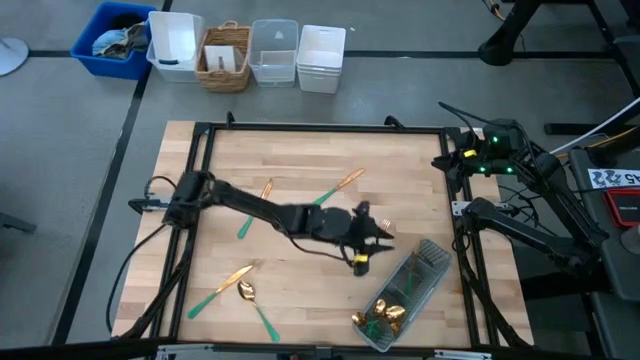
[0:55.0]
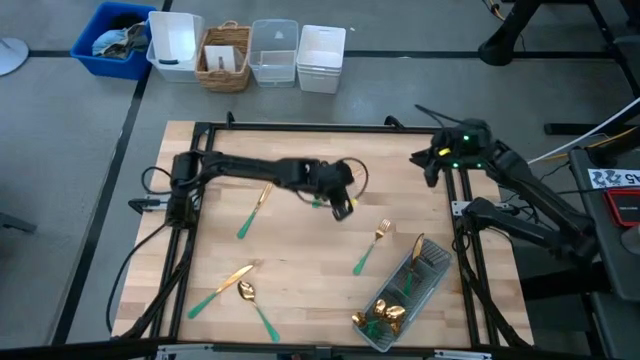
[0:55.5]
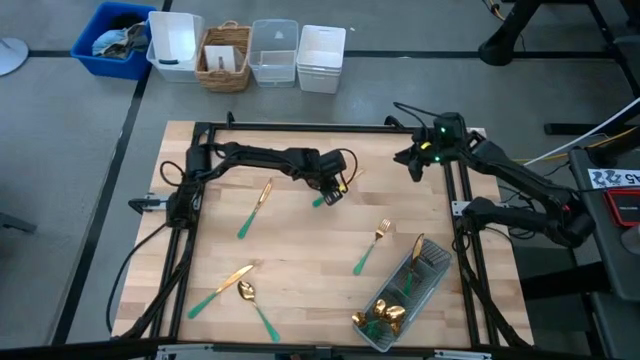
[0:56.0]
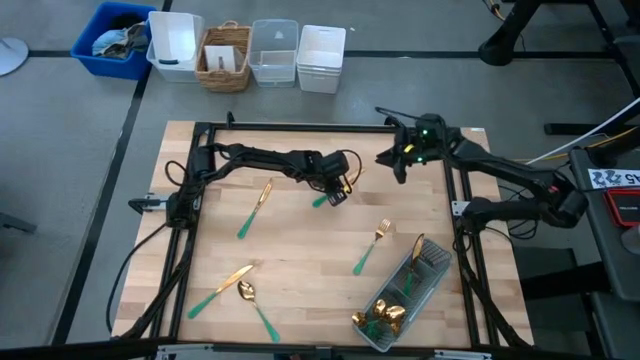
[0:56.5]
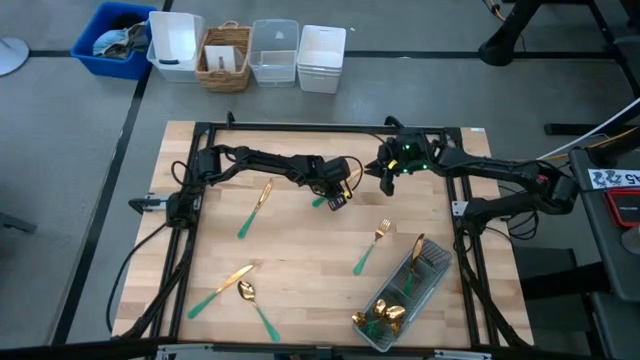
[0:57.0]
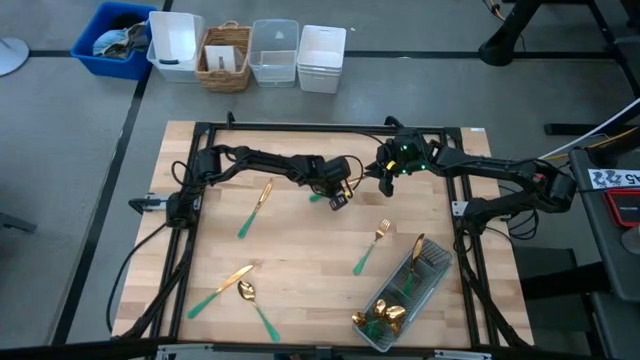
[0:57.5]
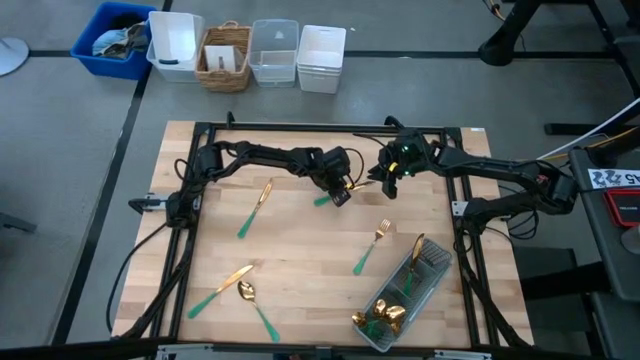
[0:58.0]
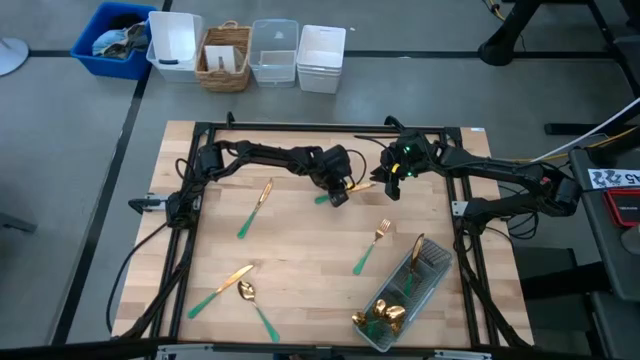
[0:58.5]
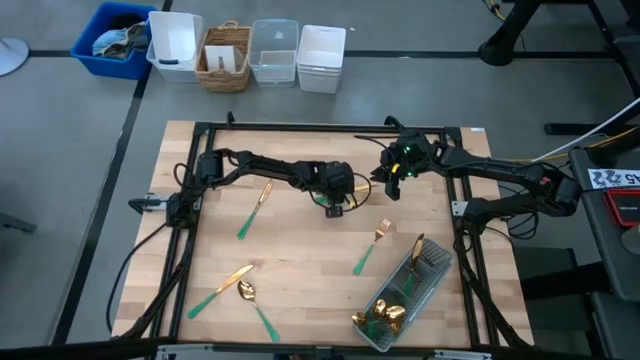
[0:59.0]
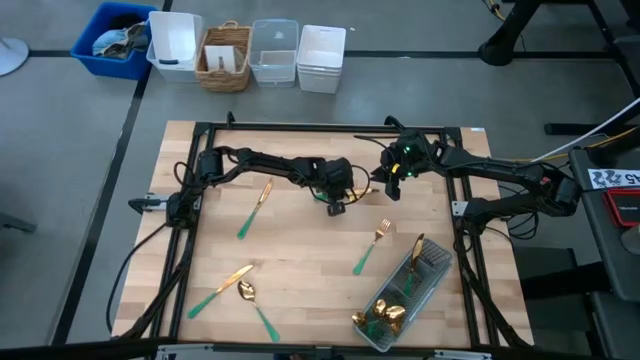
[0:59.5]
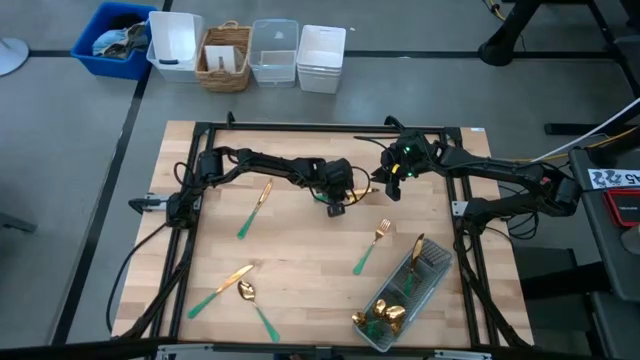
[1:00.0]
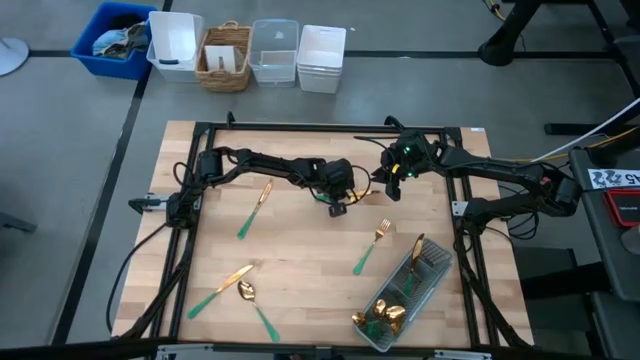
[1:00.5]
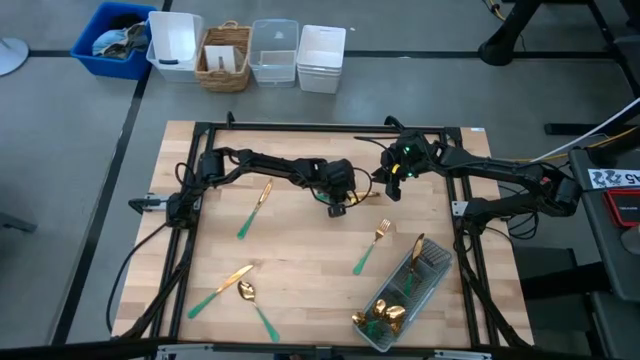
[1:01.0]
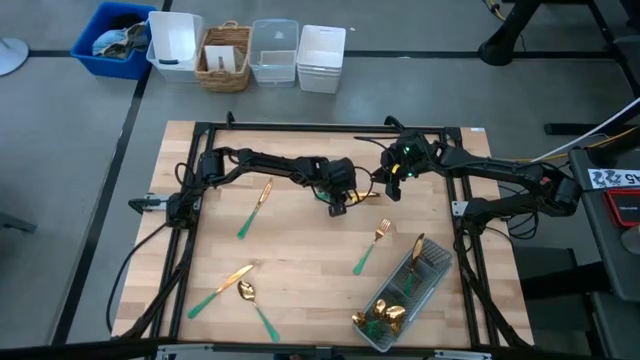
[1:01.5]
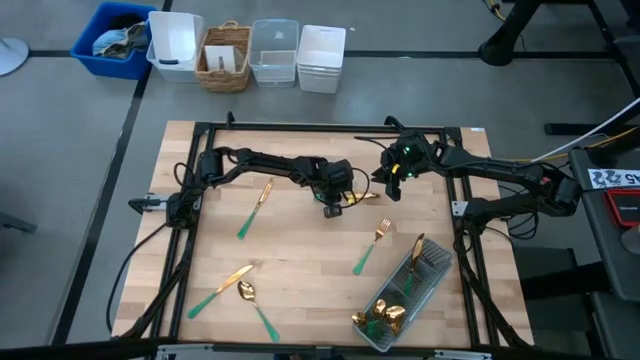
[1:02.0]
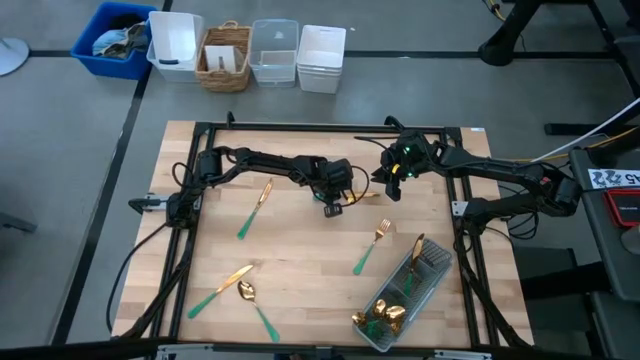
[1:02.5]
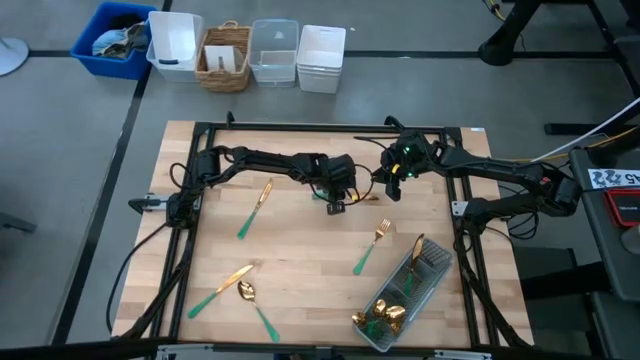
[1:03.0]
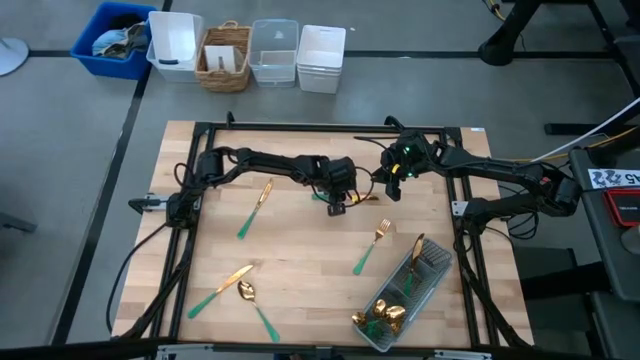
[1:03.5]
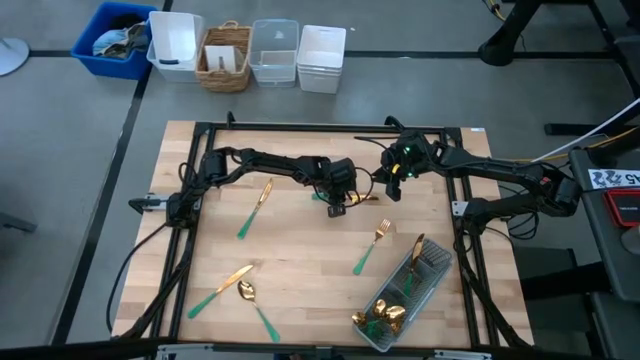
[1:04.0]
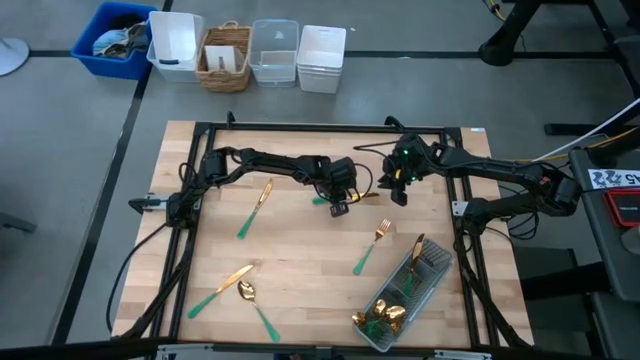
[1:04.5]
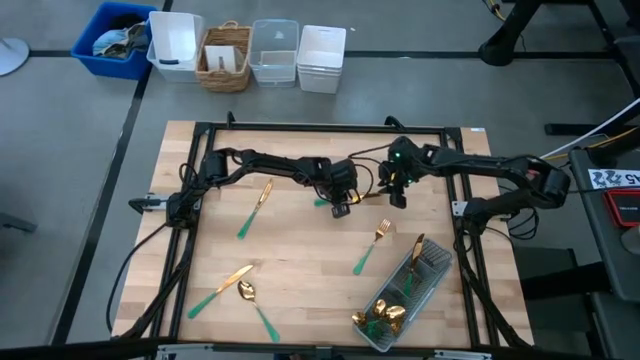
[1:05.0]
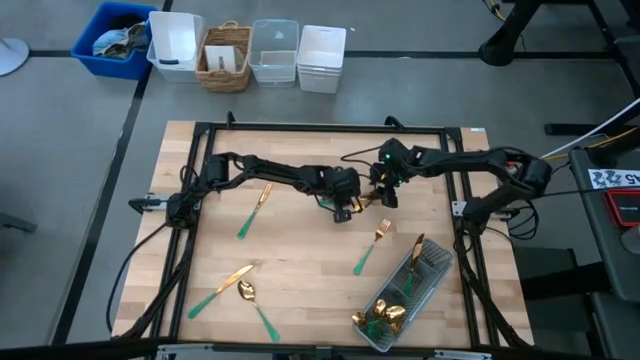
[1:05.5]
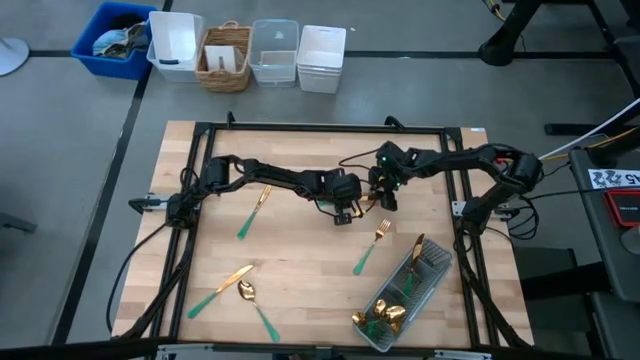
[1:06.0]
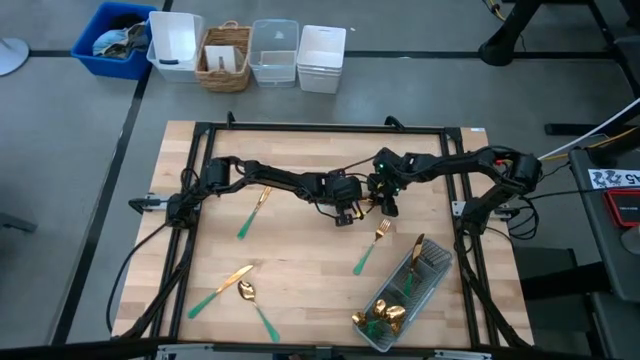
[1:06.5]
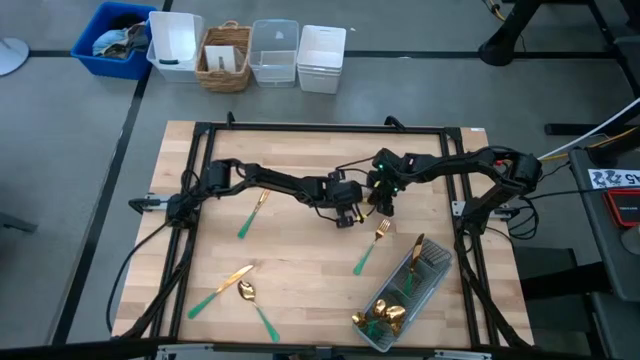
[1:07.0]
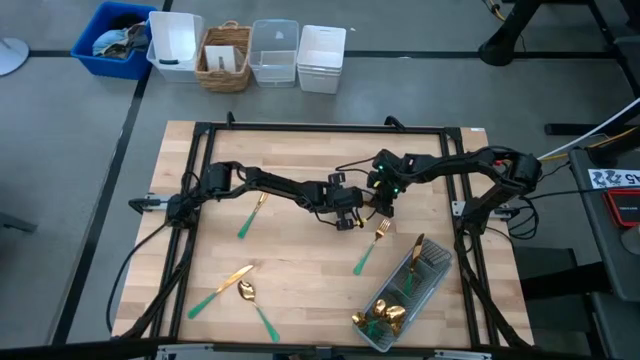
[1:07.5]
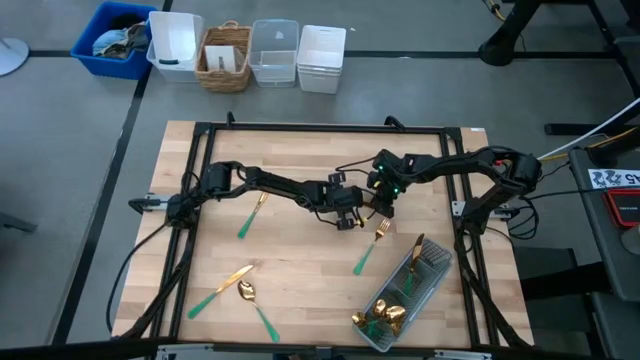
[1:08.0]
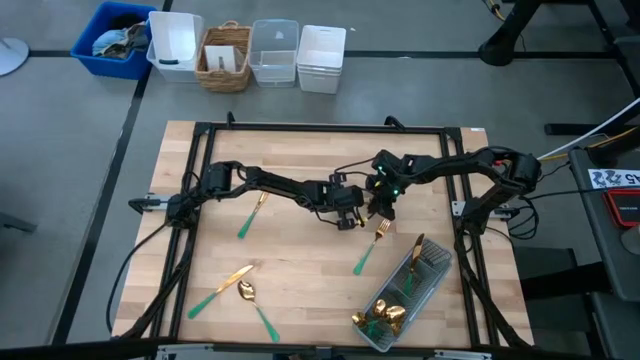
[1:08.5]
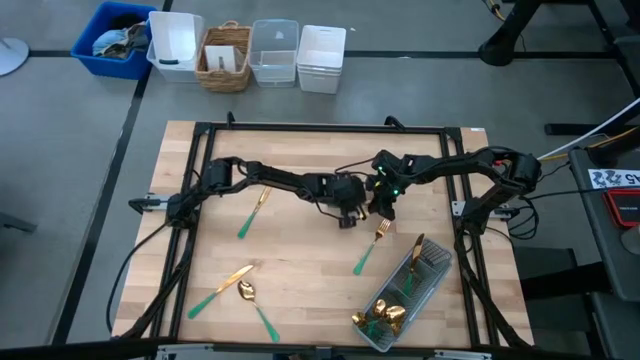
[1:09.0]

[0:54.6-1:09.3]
Task: Sort silverware
Put the top right table knife into the utensil organizer

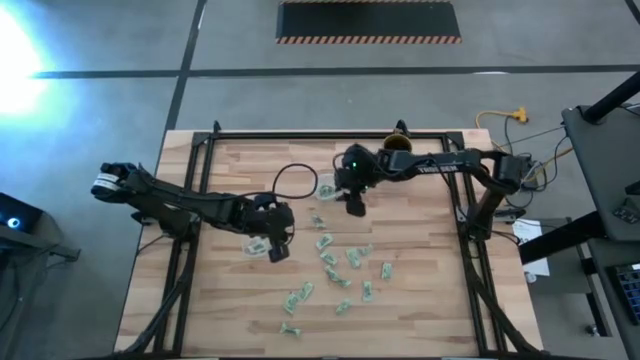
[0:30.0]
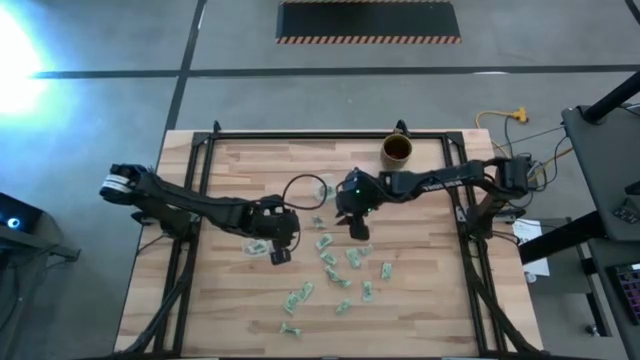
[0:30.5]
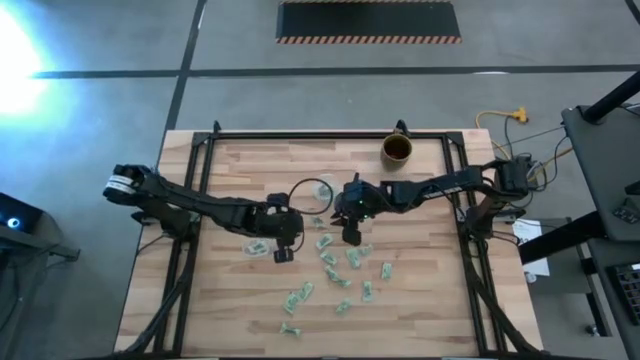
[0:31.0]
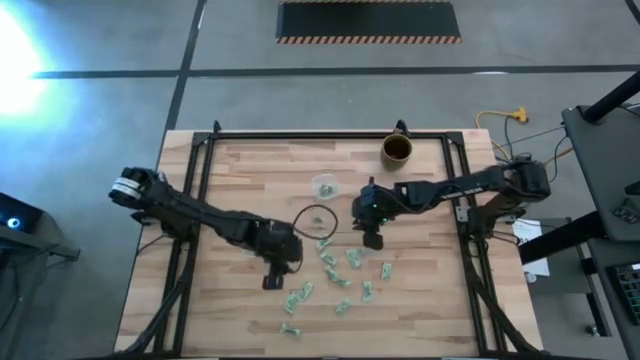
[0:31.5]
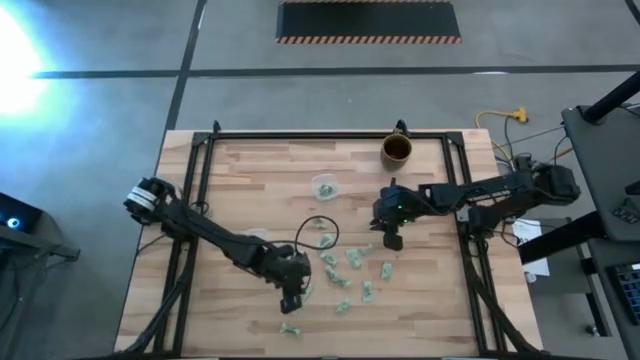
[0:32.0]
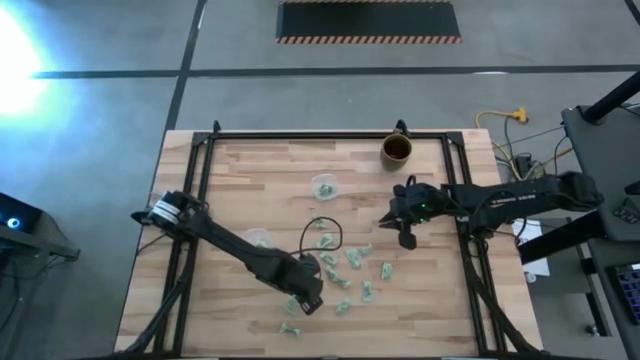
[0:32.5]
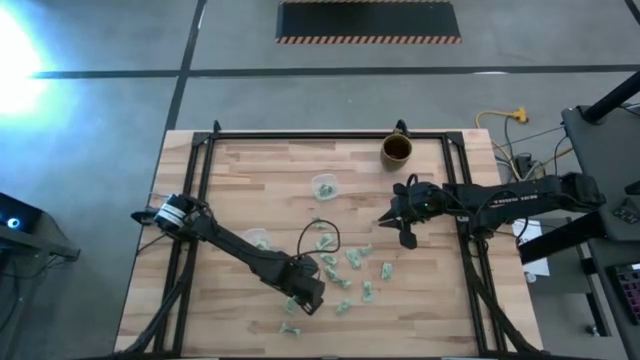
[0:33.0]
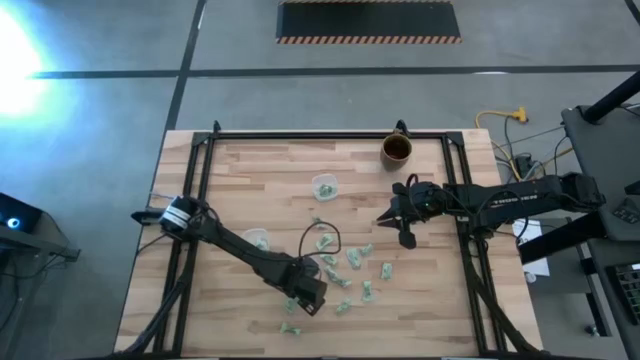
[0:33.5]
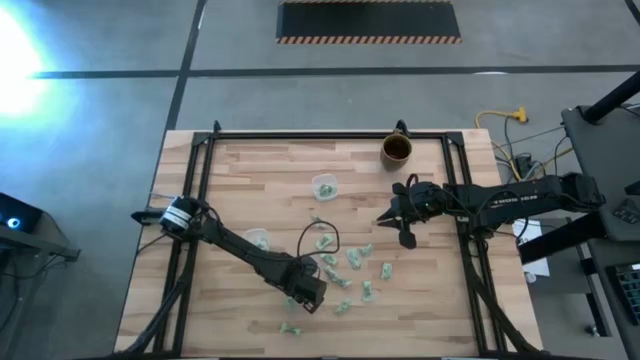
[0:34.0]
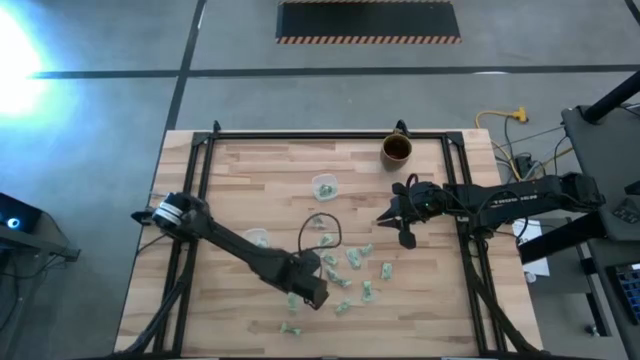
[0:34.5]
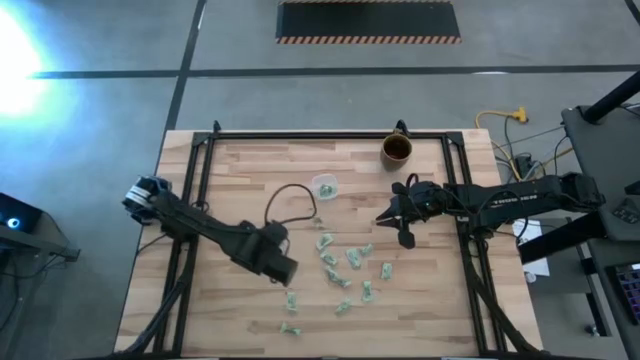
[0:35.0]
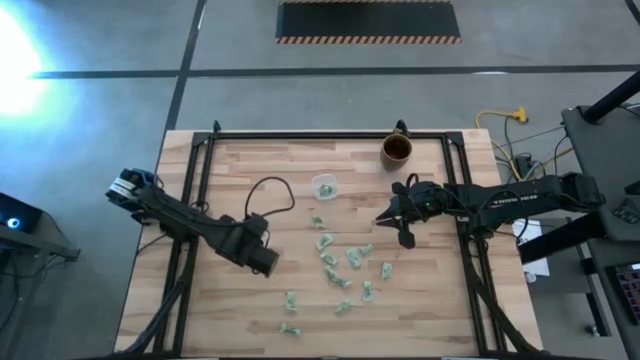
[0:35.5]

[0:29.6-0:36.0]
Task: Pick and place Stevia / Truvia into bins
Put the stevia packet into the bottom transparent container
